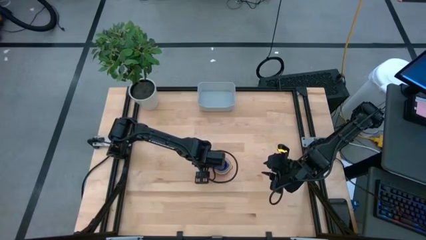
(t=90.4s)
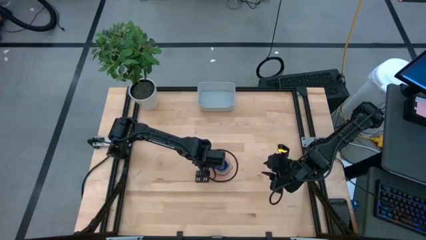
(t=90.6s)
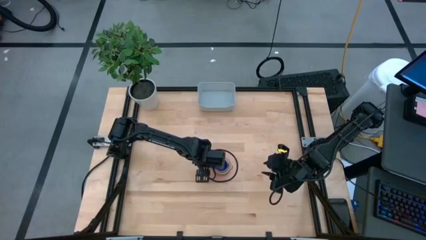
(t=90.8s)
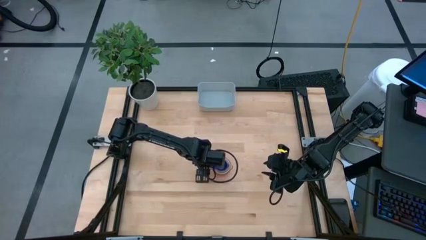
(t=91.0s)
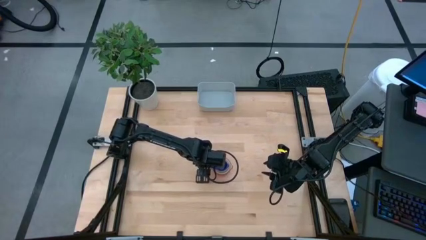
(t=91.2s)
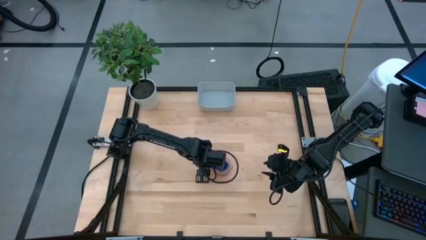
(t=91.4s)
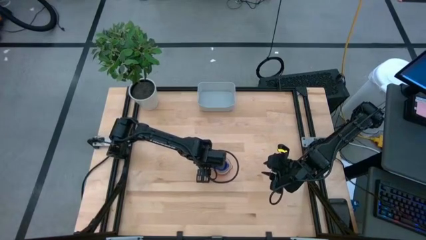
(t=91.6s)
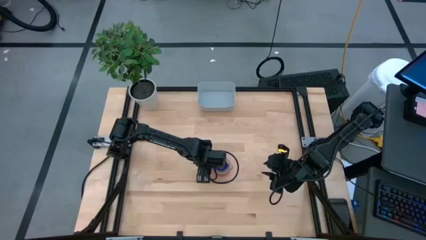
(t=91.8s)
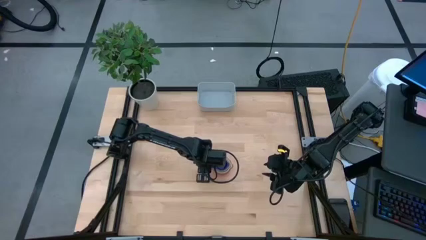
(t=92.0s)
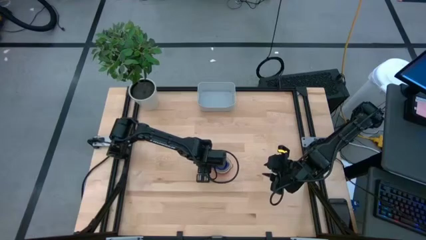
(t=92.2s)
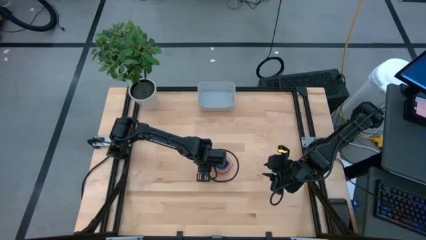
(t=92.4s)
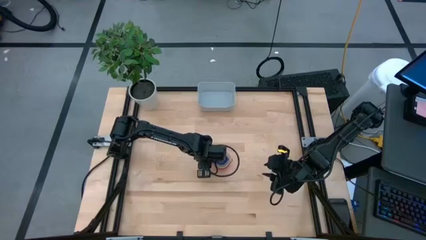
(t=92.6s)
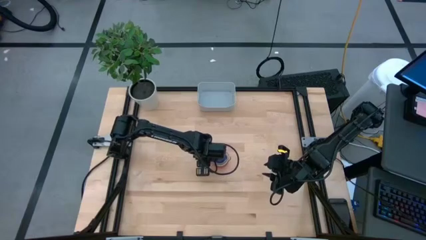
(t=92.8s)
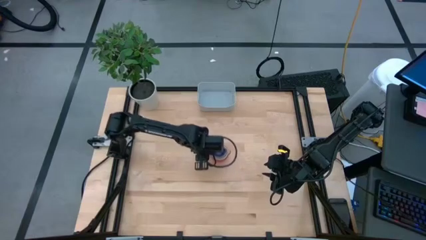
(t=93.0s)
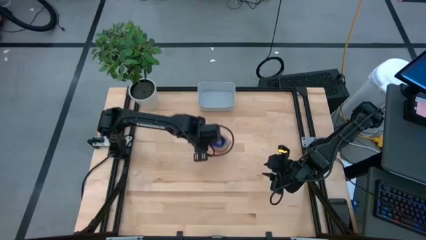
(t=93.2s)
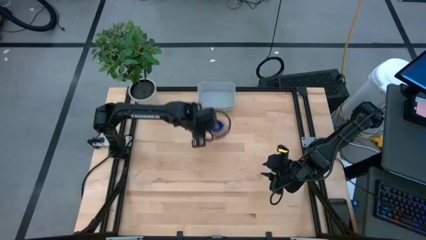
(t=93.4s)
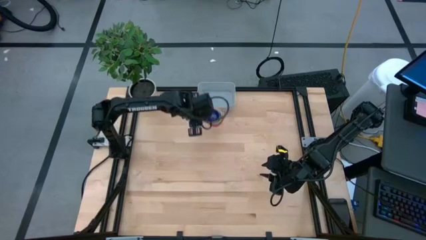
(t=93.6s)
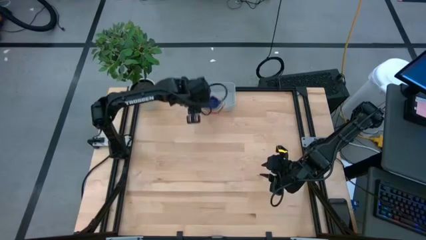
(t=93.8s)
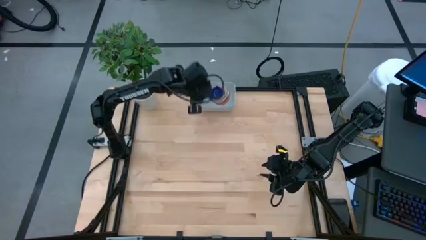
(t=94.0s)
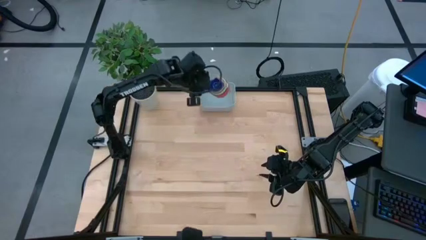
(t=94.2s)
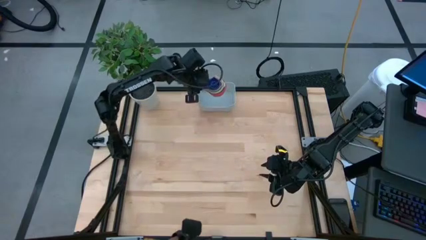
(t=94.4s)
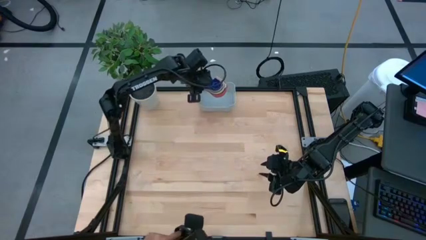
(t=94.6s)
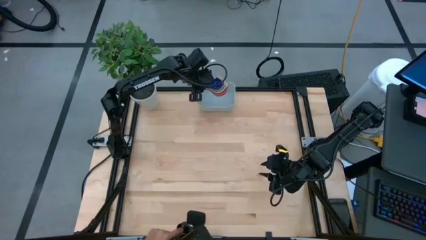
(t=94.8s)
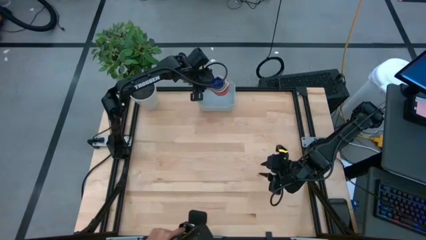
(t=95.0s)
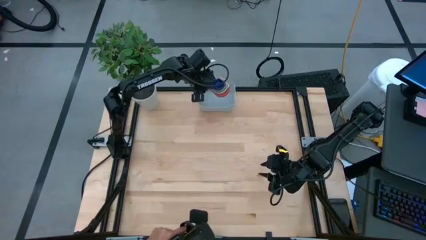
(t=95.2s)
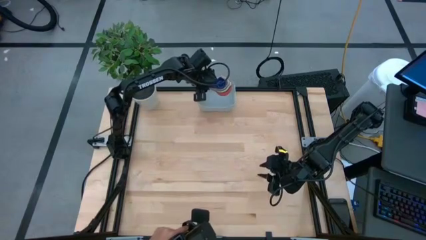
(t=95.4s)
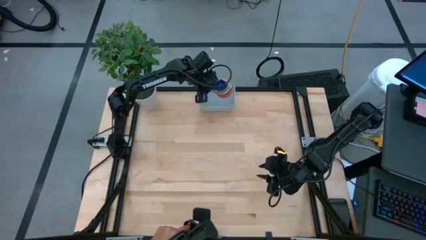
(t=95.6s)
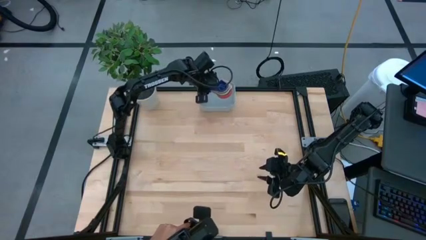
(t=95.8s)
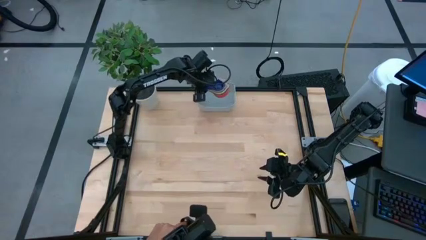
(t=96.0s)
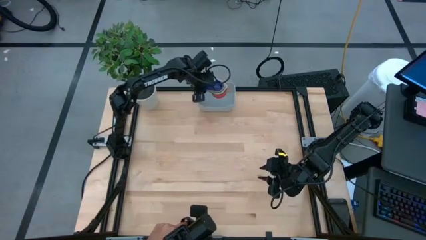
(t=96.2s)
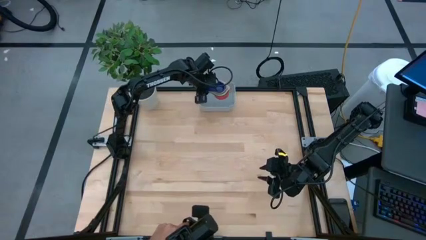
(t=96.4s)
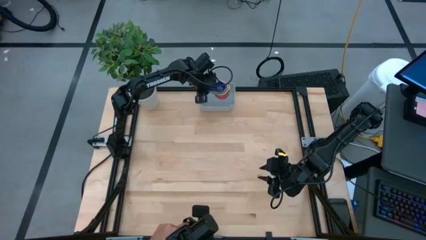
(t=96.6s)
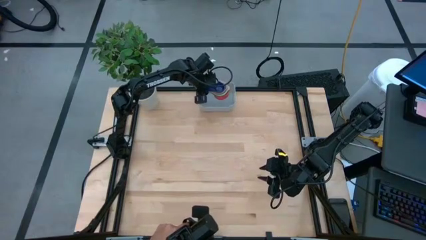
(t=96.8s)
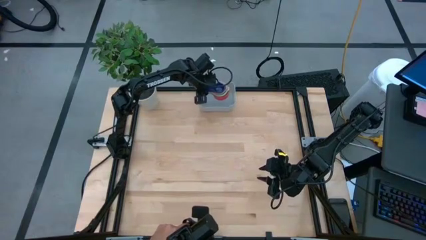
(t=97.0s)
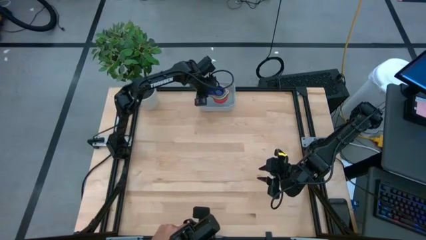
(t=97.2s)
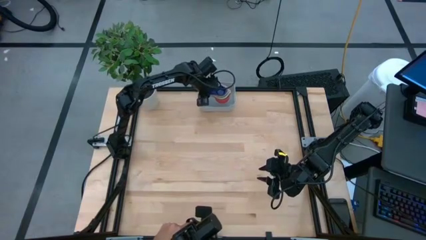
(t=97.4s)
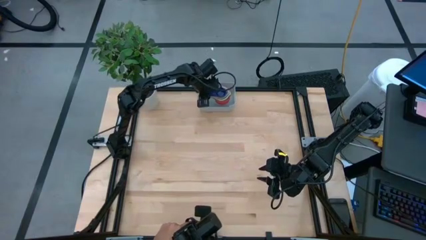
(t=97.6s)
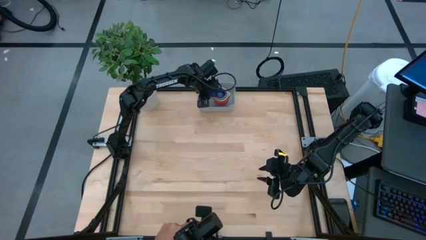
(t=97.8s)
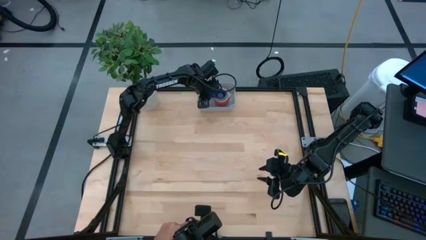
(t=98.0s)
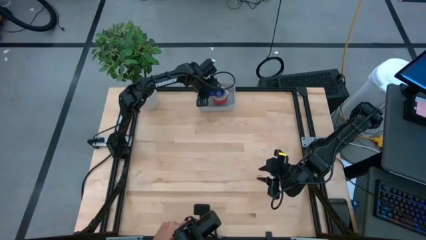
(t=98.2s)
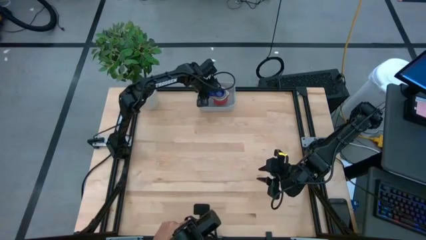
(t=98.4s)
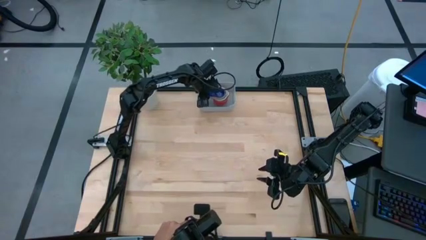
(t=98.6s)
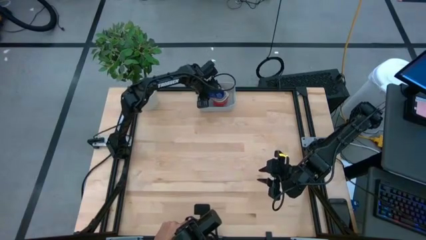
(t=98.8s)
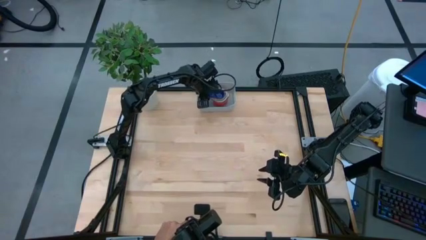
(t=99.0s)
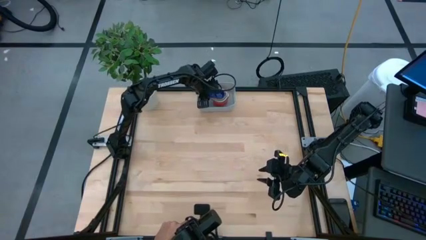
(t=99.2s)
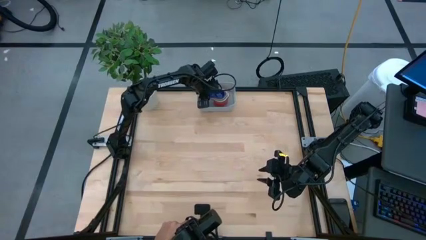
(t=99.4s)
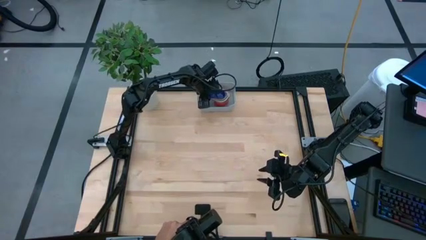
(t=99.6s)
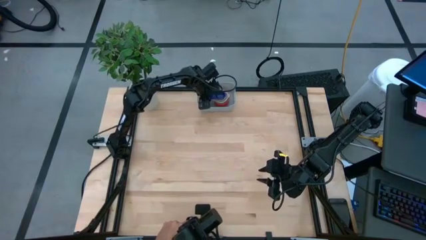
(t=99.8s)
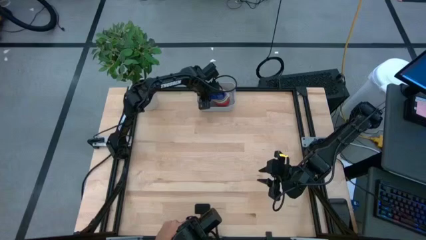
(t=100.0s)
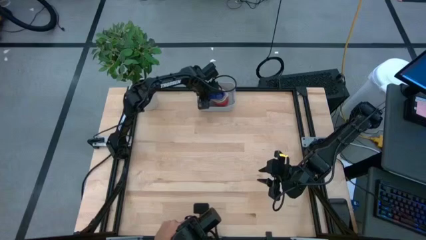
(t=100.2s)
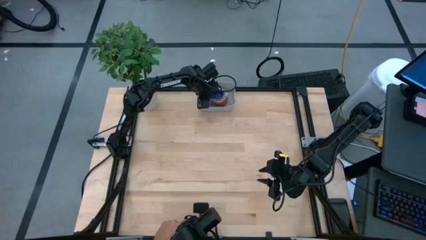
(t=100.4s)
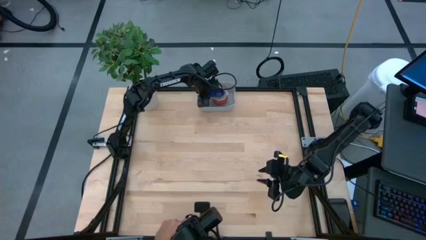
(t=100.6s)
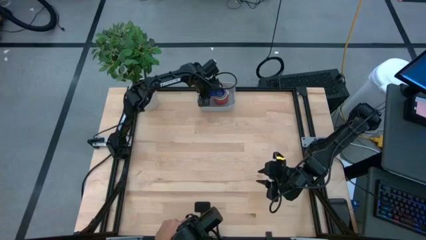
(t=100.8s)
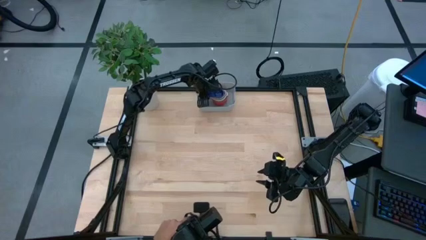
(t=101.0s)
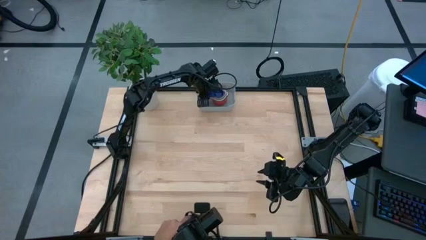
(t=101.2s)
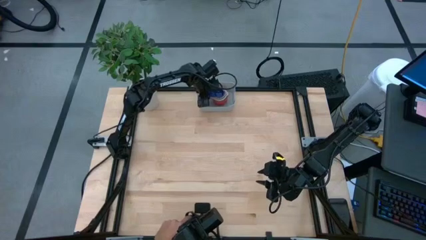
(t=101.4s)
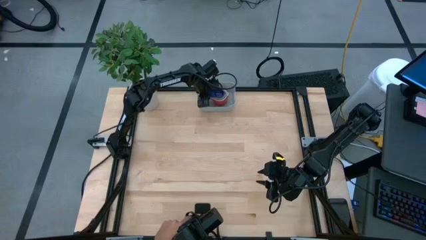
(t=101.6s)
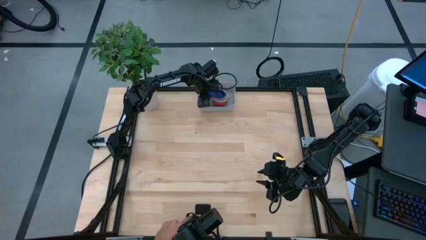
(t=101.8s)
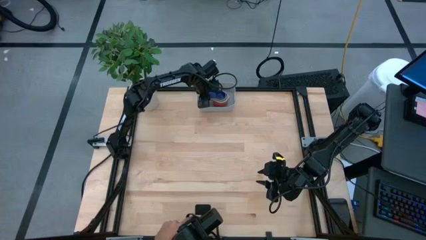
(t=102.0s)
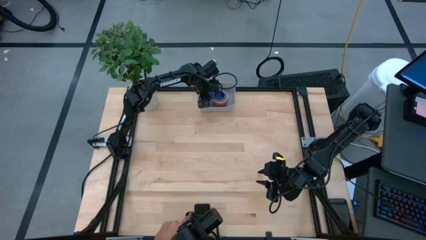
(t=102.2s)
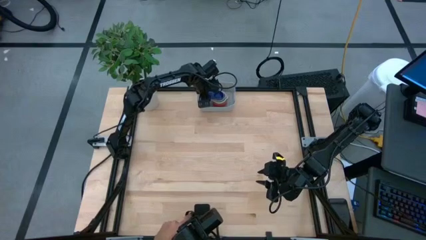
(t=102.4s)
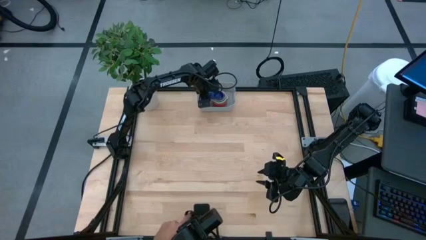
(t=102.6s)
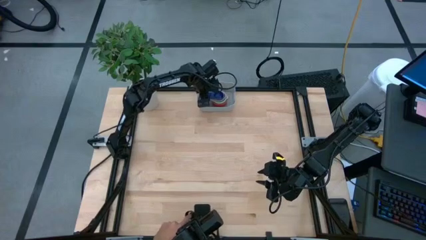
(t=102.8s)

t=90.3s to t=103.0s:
Task: Nest measuring cups in basket
Put the nested measuring cups into the gray bin

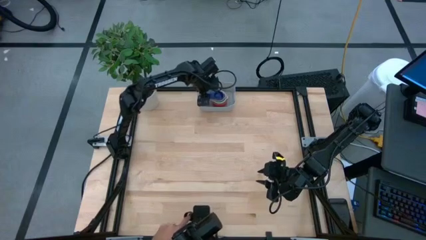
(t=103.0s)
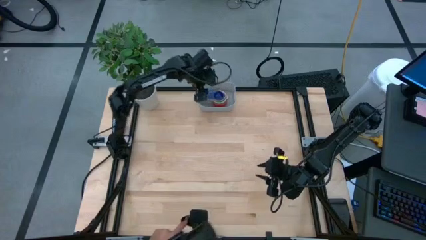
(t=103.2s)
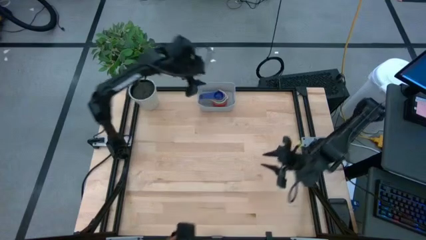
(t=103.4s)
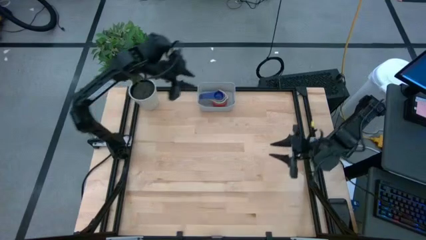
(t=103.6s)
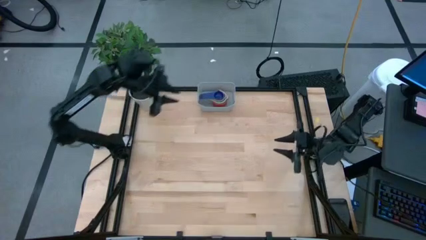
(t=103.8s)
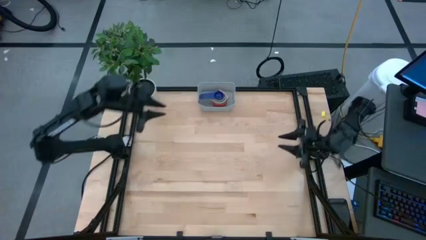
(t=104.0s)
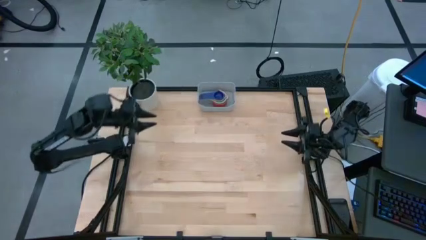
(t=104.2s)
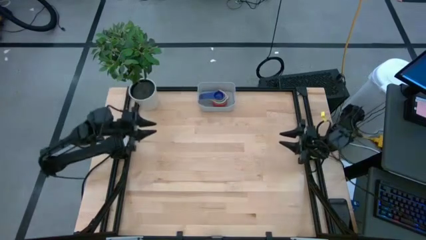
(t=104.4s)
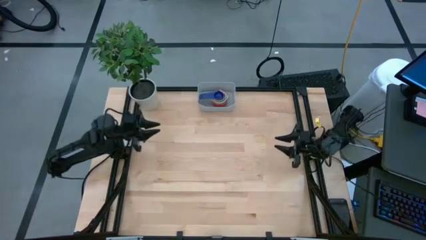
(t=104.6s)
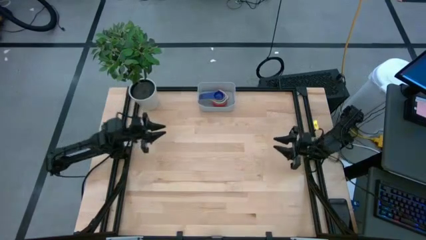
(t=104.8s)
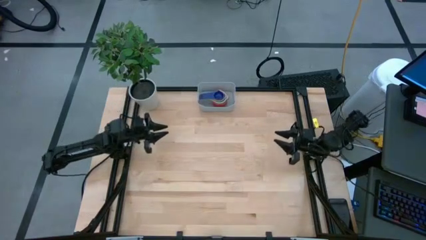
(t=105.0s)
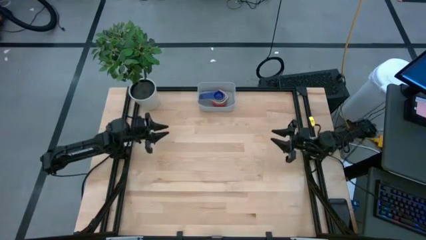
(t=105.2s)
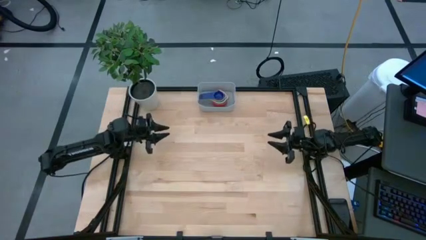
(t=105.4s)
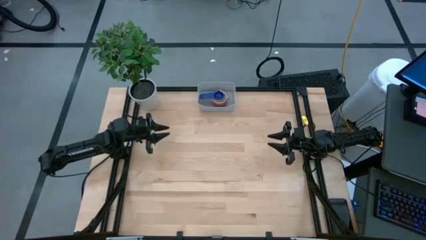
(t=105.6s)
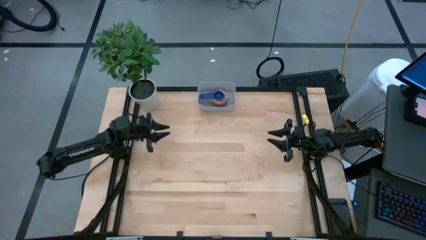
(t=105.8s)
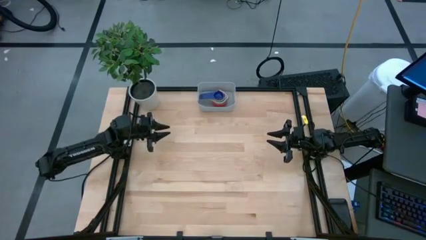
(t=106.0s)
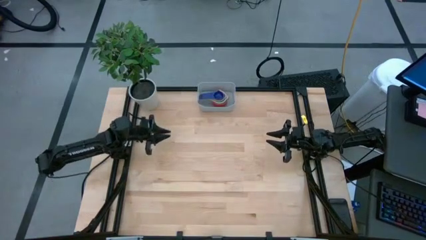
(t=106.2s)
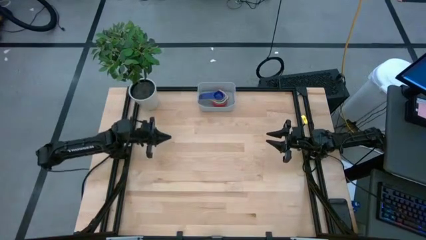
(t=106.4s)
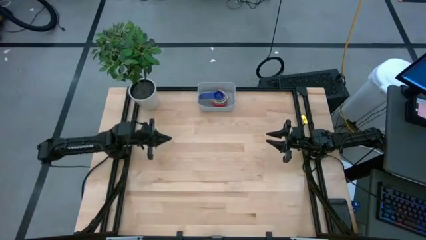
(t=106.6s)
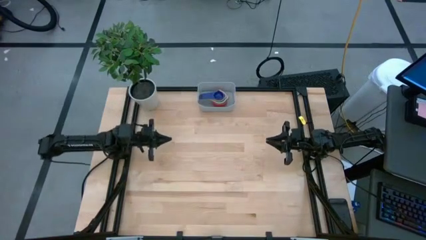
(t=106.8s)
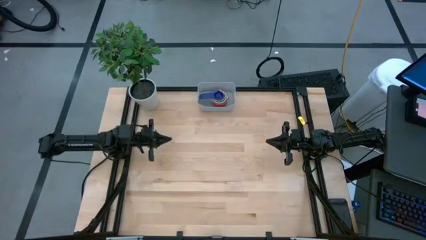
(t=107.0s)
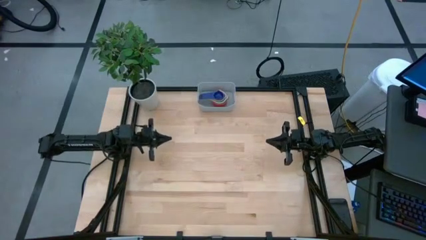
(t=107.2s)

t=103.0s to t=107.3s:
Return to Home Position
